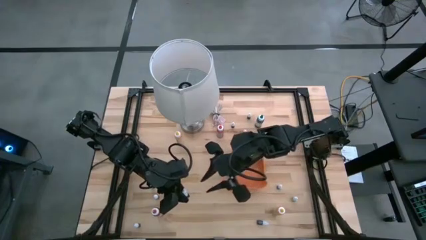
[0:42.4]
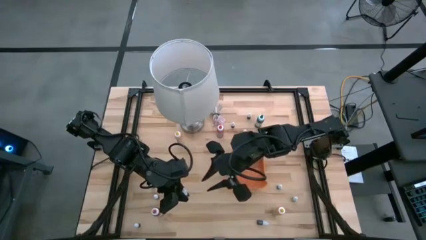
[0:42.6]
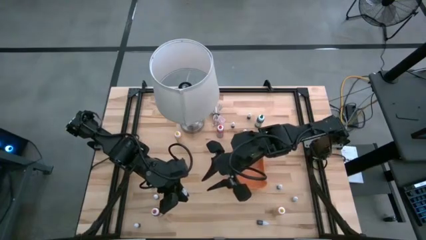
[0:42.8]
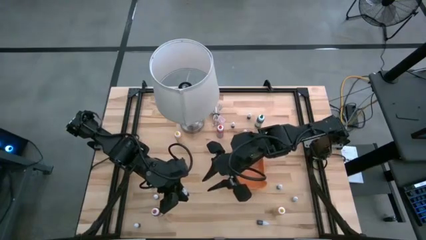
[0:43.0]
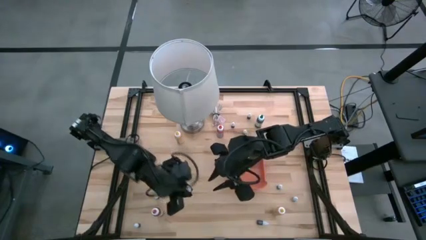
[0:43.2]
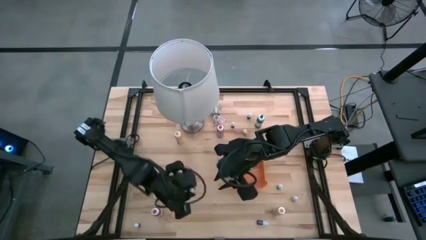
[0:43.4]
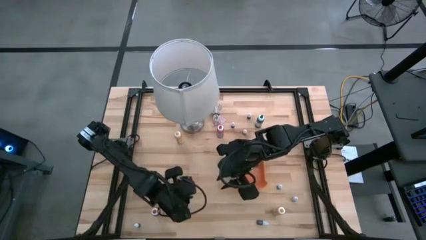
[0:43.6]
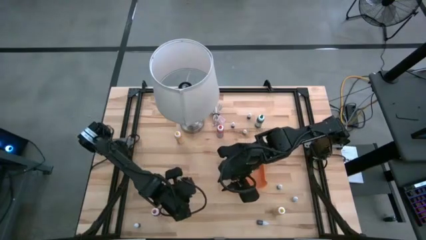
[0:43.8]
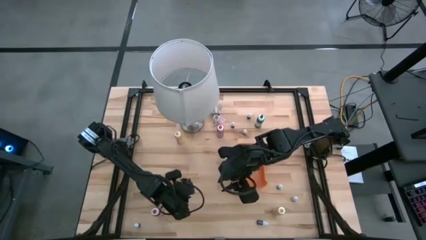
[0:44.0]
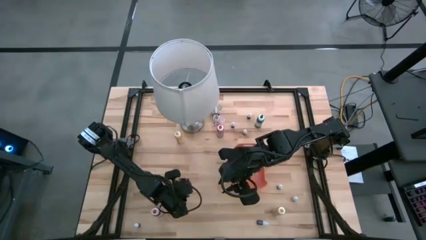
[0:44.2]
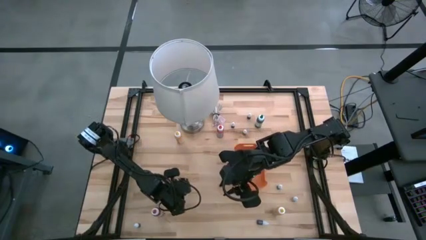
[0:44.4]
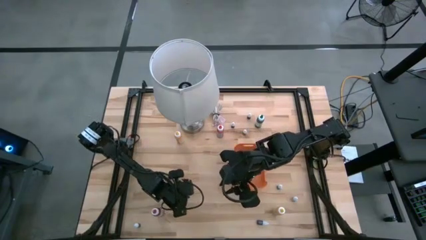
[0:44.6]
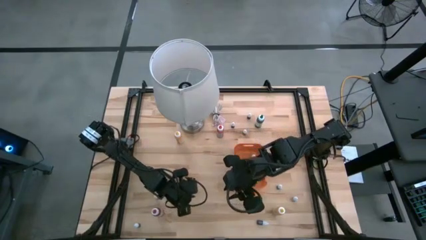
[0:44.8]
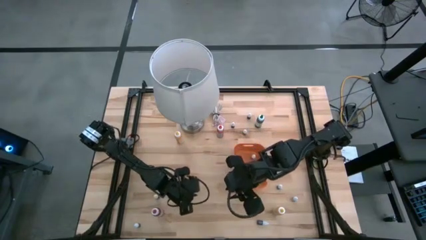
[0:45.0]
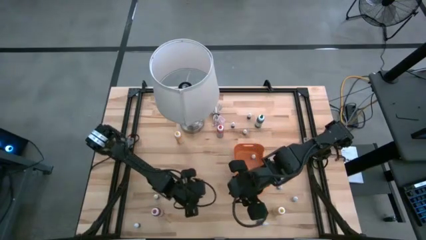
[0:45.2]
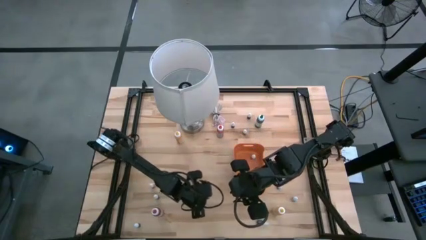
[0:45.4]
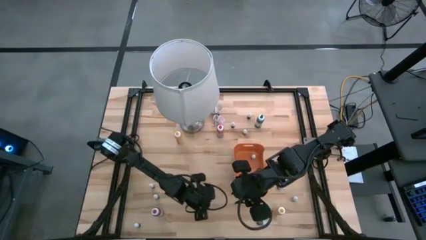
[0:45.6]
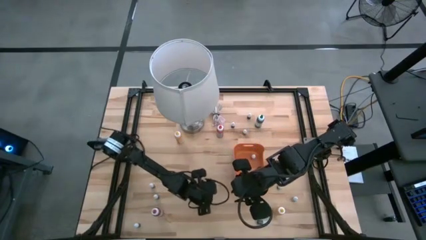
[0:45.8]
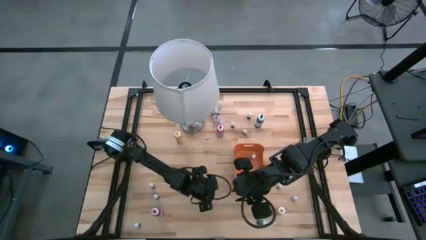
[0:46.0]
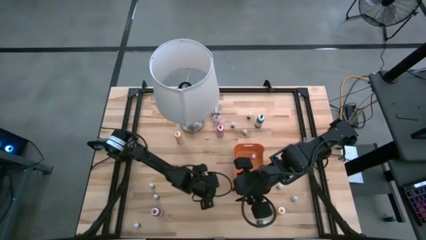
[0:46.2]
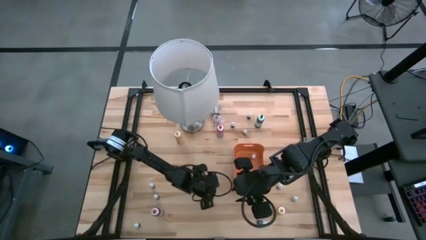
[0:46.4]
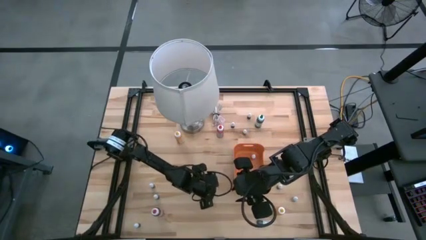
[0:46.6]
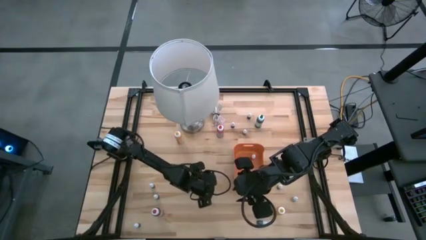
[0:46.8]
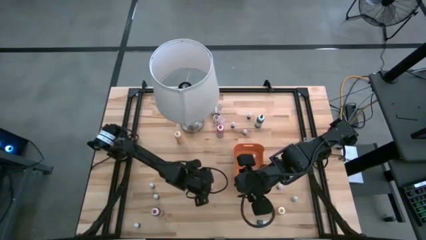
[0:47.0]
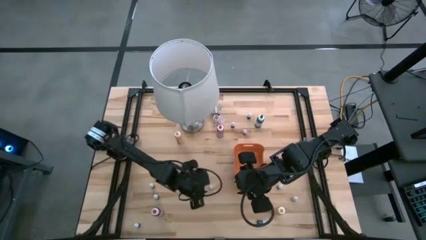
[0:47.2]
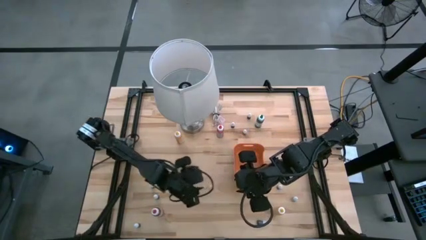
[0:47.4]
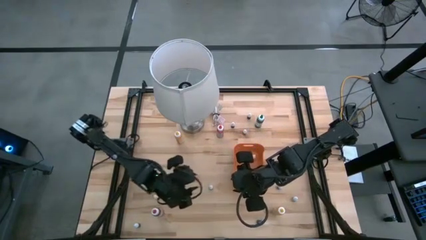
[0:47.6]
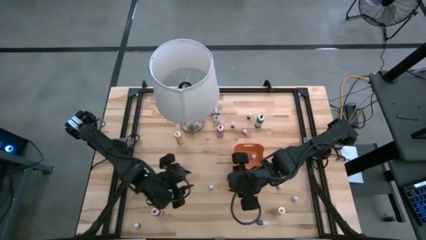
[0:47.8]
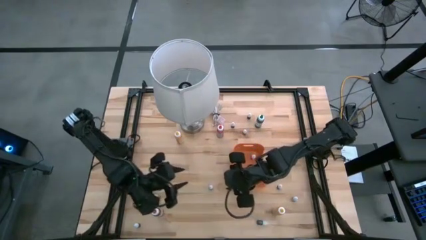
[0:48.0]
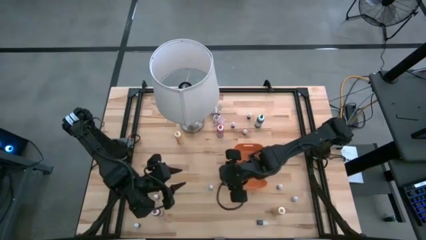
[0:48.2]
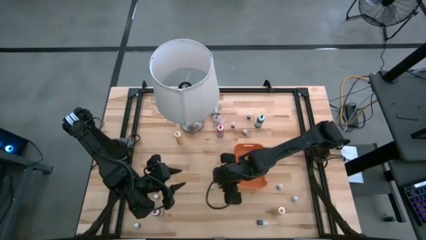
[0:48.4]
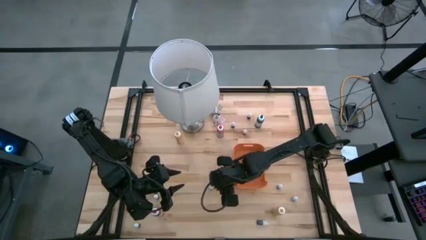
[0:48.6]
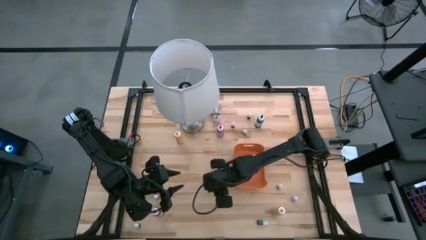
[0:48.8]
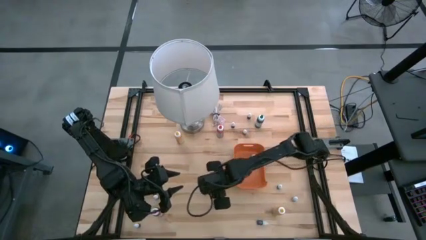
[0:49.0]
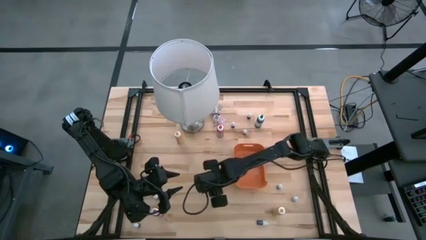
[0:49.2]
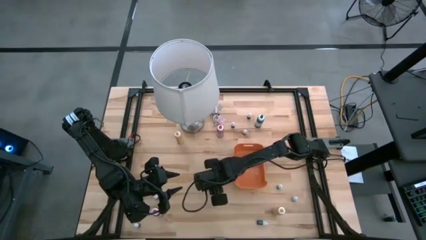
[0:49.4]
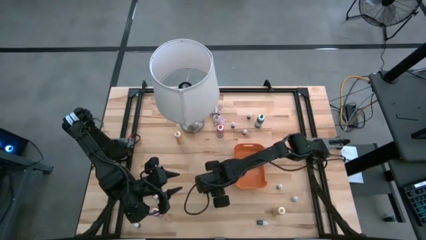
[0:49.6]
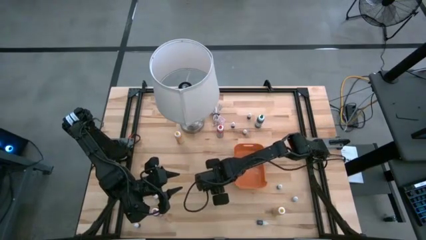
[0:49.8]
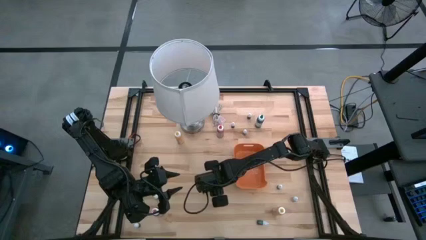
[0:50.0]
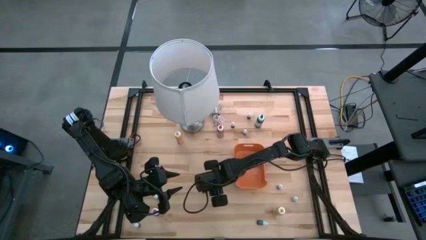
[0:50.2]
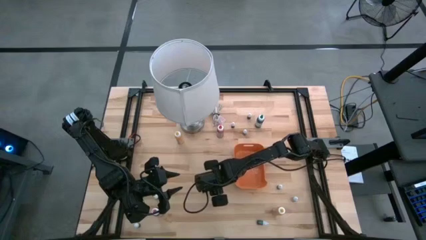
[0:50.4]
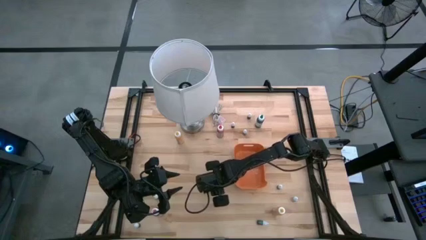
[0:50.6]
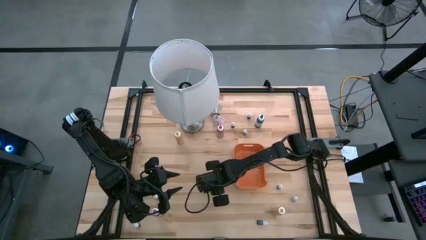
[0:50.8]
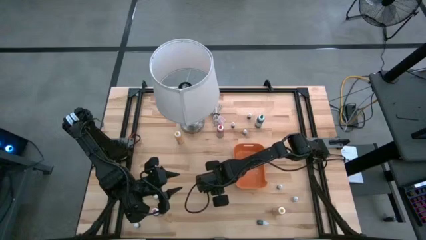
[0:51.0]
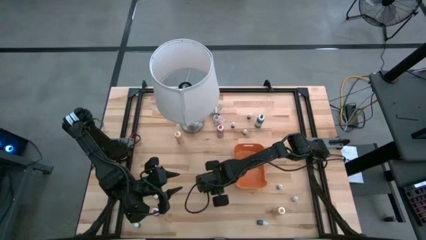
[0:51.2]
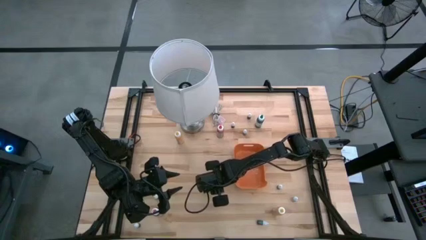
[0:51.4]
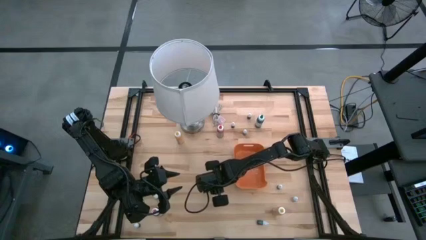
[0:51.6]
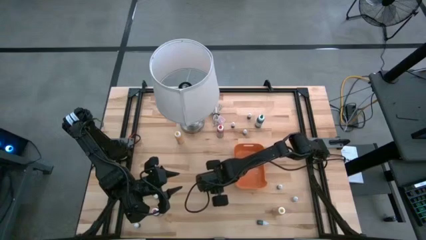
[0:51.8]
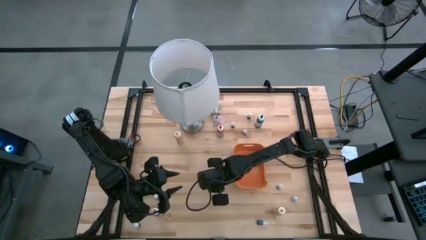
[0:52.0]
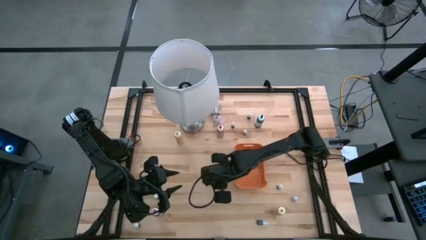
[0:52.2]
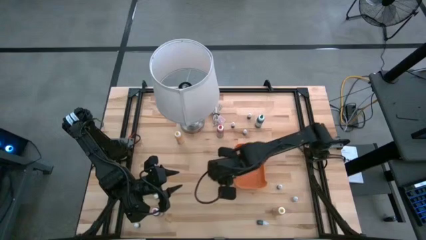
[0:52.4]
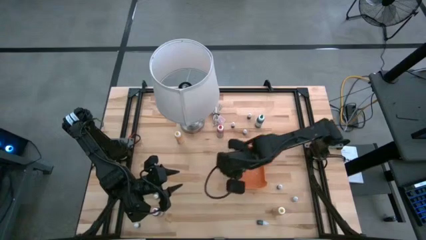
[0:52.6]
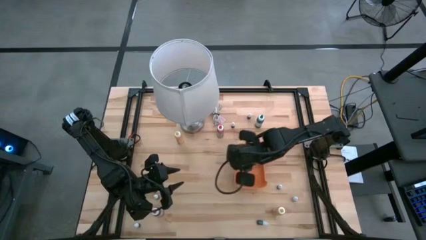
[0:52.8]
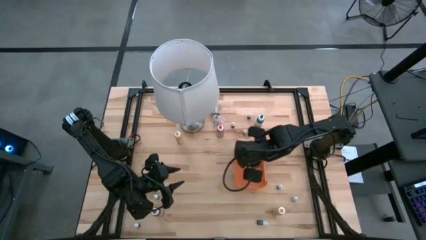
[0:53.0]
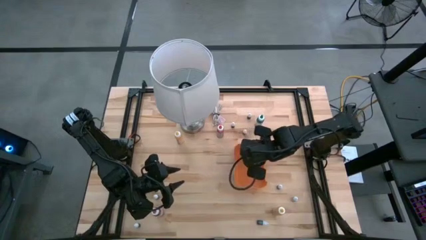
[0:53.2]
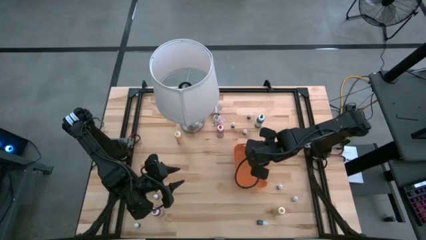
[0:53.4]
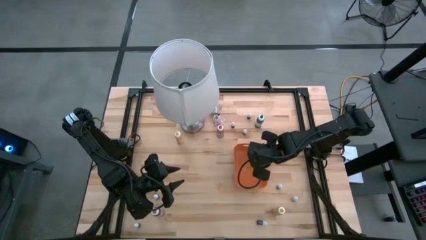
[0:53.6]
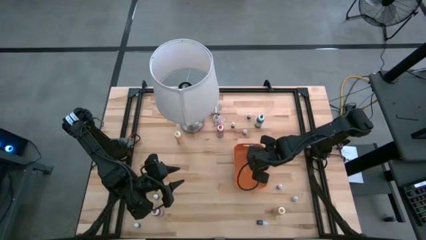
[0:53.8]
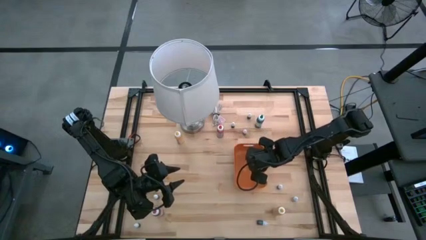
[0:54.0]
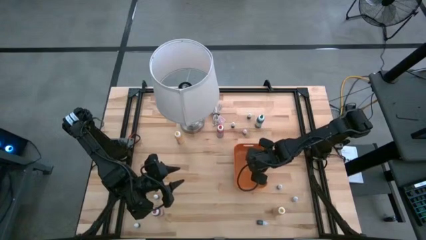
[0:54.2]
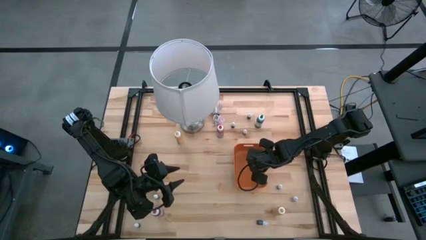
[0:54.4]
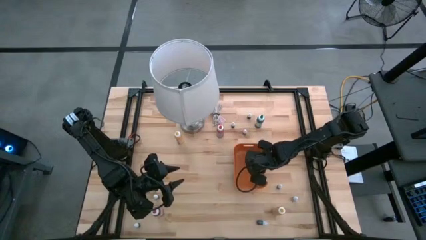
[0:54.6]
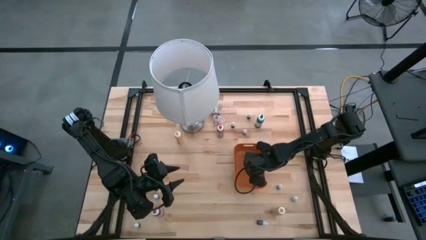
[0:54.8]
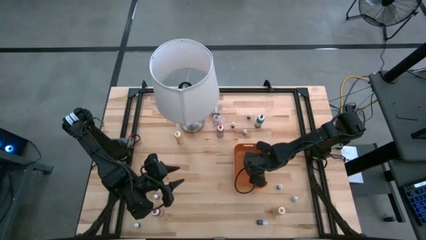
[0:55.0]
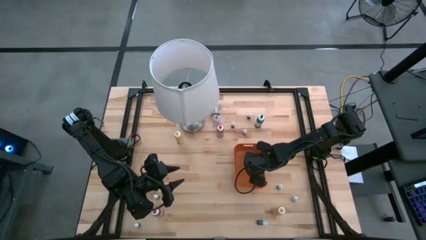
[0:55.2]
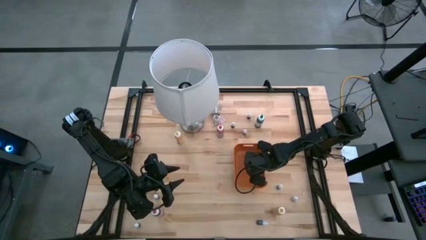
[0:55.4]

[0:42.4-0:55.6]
Task: Pick & Place food coloring
Put the small food coloring bottle into the orange bin
